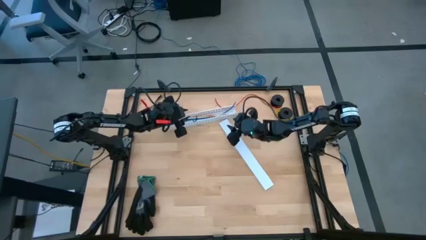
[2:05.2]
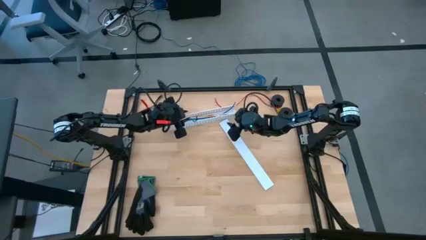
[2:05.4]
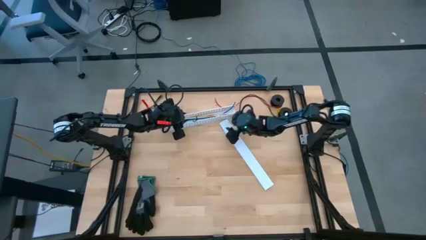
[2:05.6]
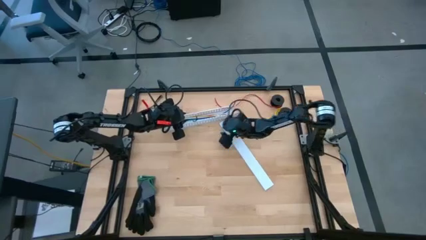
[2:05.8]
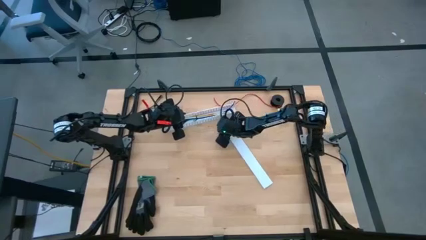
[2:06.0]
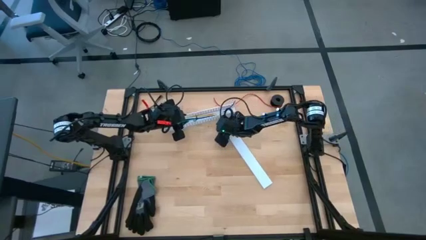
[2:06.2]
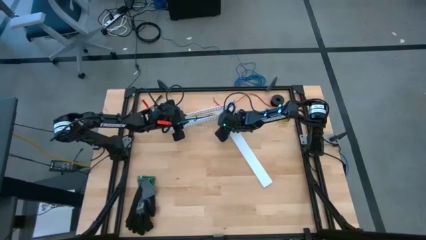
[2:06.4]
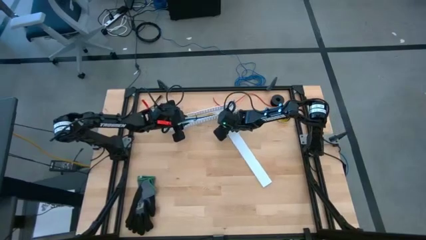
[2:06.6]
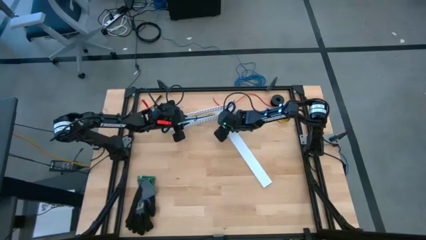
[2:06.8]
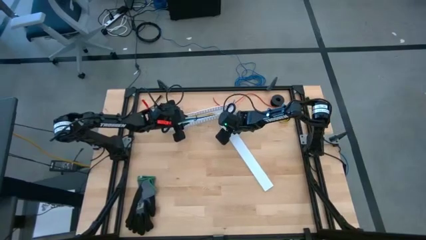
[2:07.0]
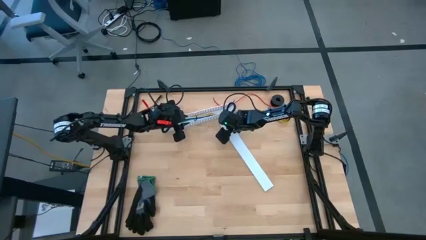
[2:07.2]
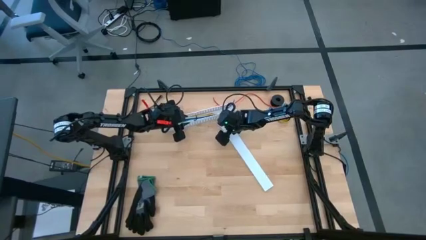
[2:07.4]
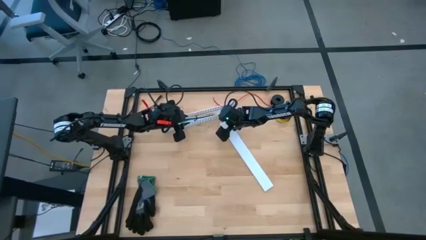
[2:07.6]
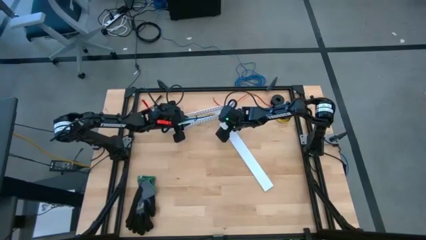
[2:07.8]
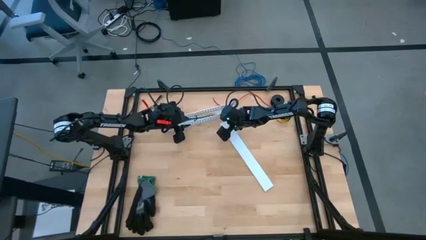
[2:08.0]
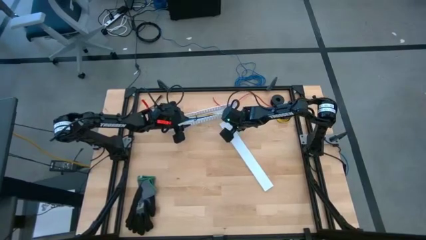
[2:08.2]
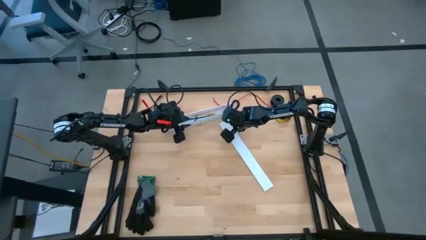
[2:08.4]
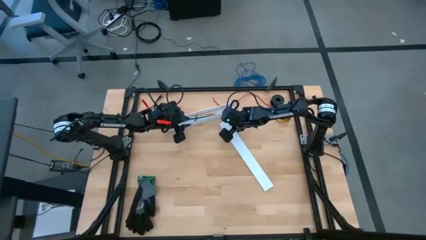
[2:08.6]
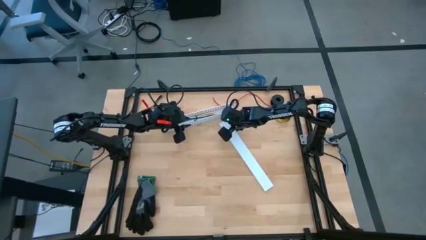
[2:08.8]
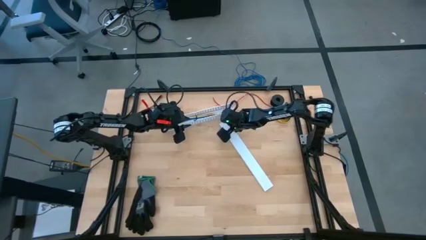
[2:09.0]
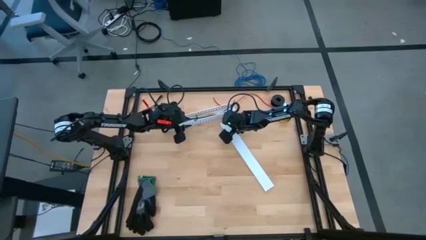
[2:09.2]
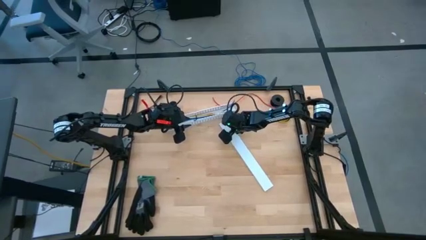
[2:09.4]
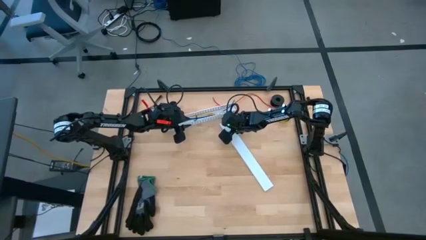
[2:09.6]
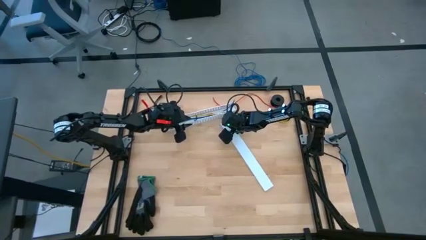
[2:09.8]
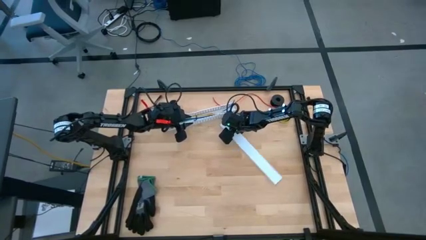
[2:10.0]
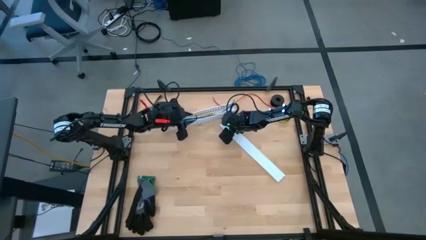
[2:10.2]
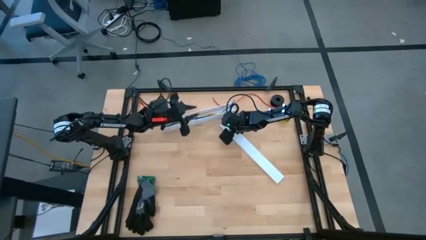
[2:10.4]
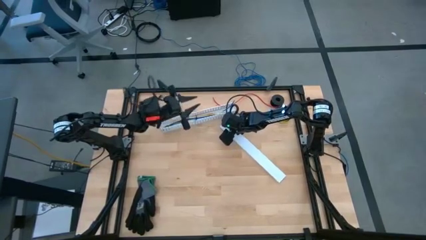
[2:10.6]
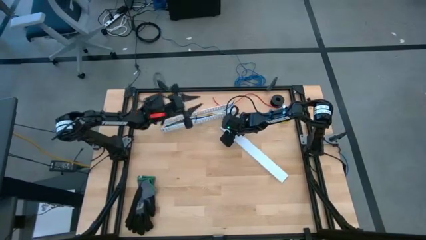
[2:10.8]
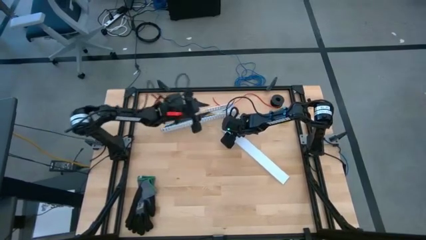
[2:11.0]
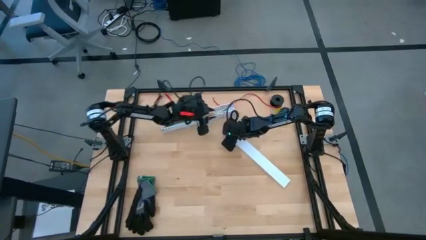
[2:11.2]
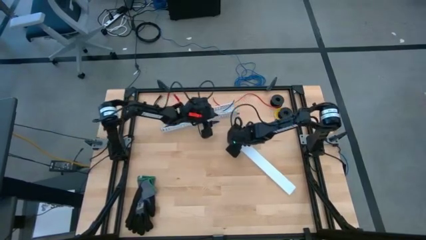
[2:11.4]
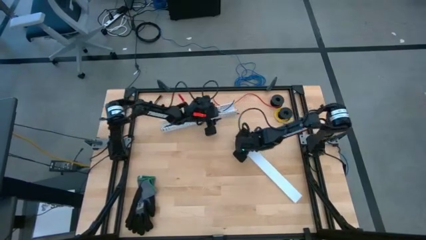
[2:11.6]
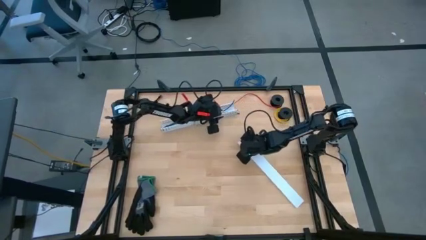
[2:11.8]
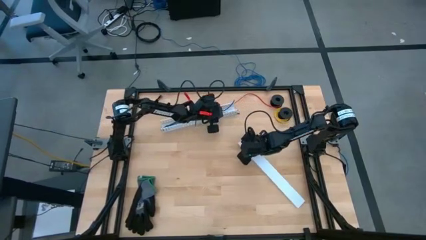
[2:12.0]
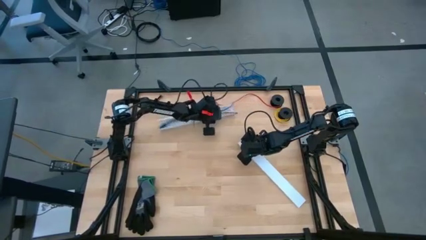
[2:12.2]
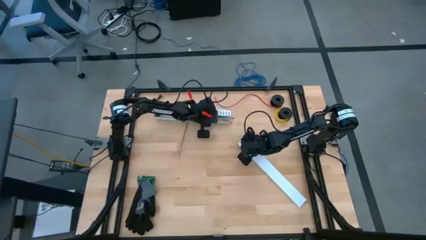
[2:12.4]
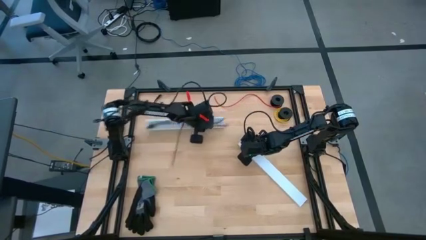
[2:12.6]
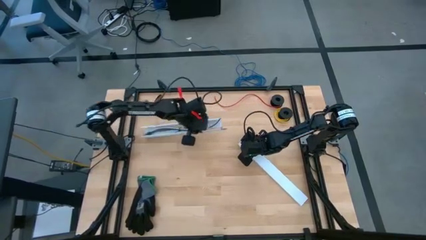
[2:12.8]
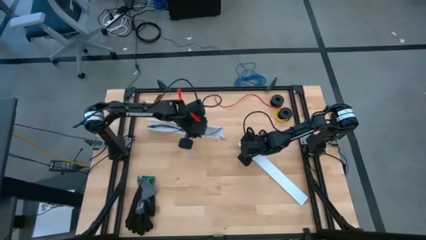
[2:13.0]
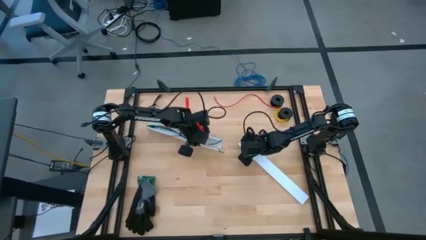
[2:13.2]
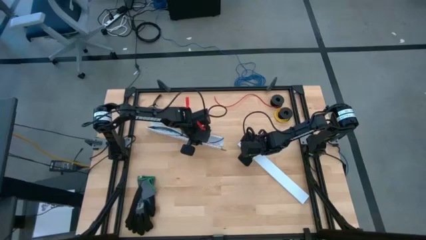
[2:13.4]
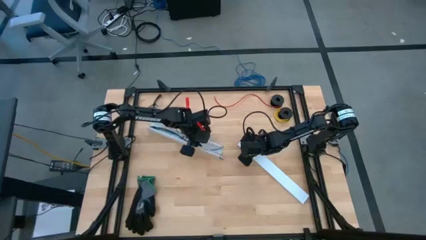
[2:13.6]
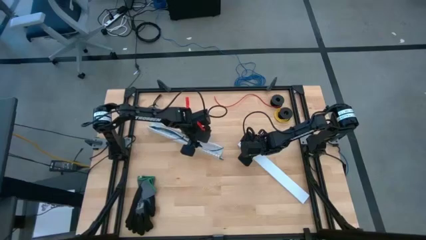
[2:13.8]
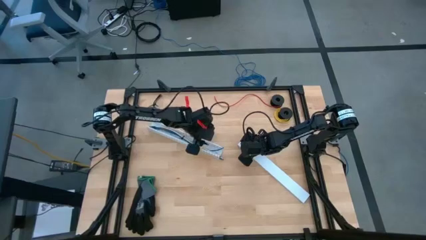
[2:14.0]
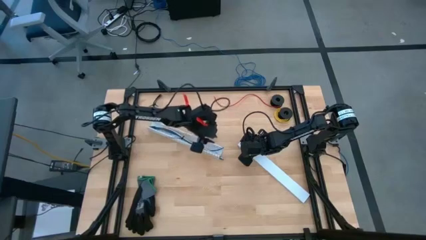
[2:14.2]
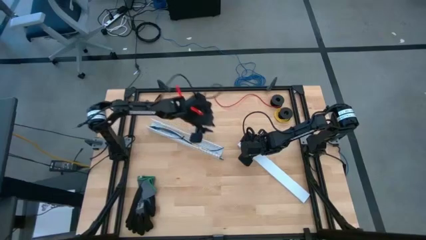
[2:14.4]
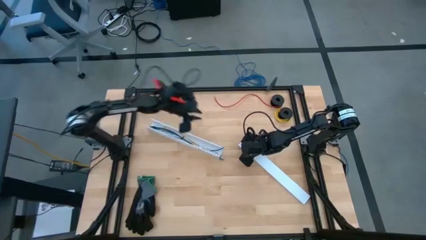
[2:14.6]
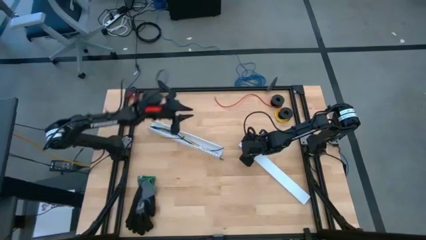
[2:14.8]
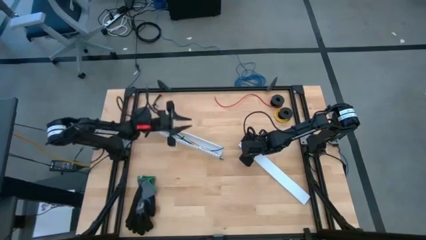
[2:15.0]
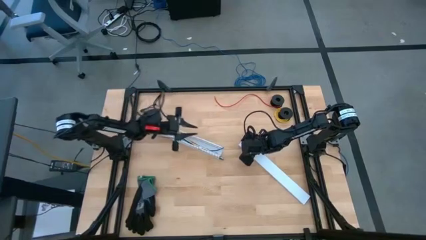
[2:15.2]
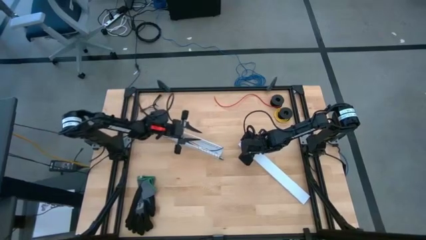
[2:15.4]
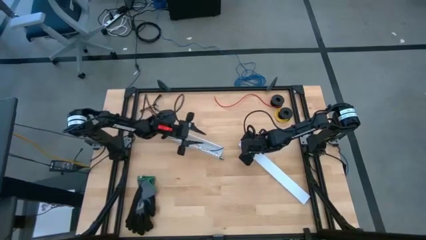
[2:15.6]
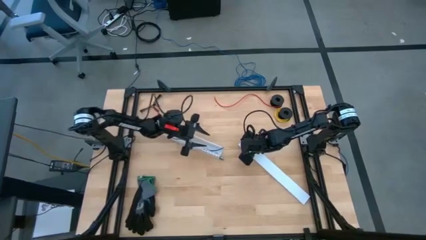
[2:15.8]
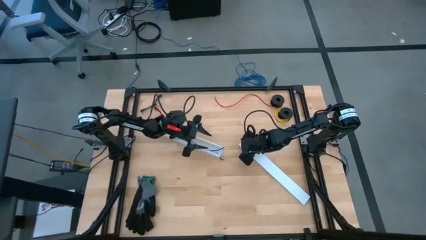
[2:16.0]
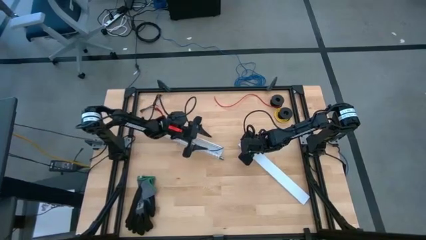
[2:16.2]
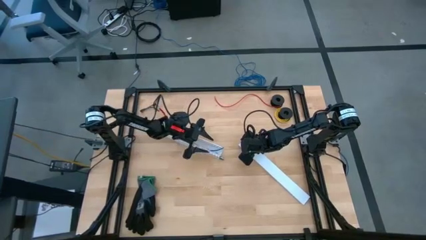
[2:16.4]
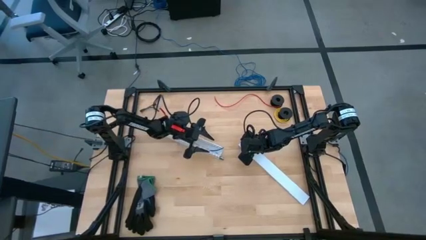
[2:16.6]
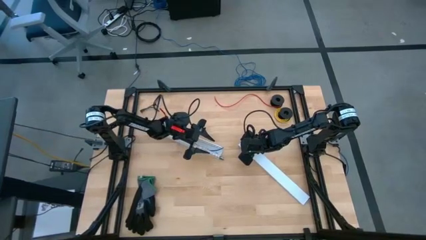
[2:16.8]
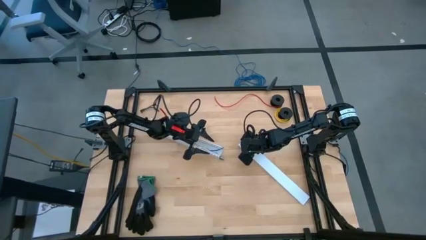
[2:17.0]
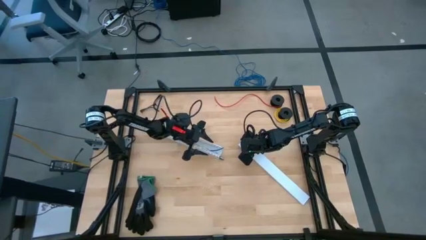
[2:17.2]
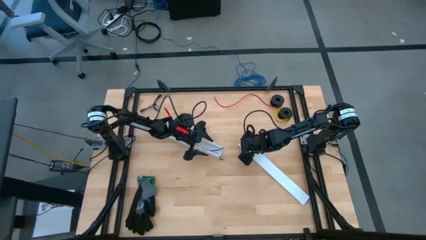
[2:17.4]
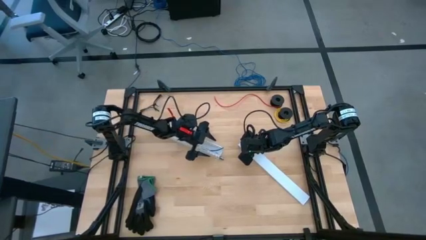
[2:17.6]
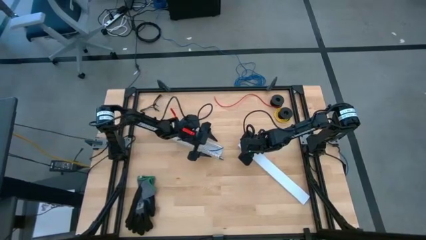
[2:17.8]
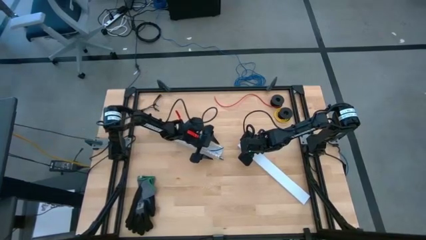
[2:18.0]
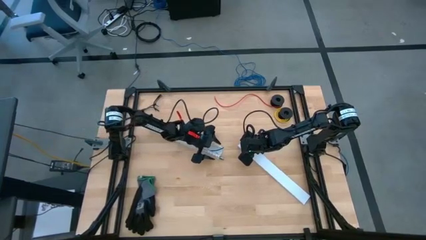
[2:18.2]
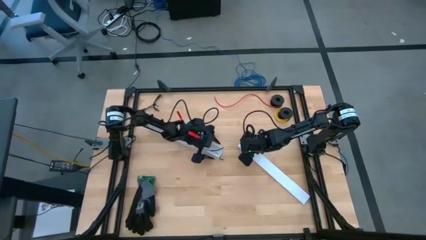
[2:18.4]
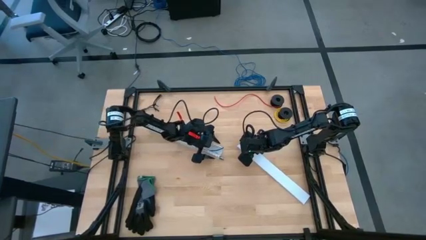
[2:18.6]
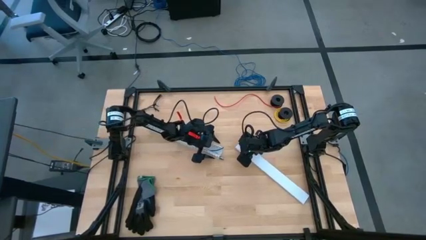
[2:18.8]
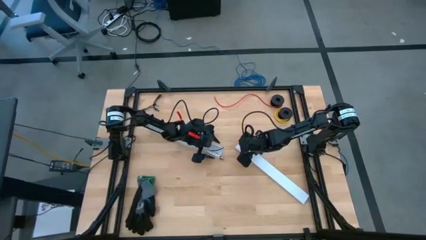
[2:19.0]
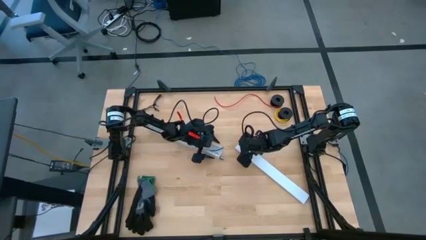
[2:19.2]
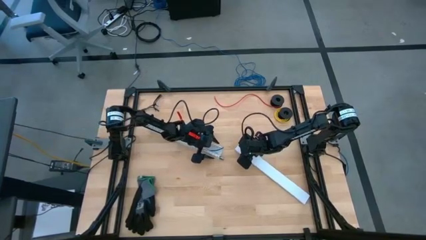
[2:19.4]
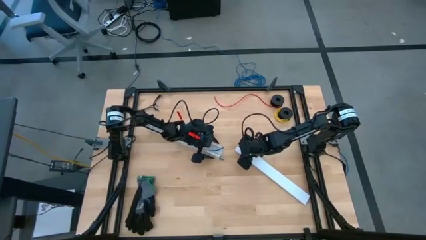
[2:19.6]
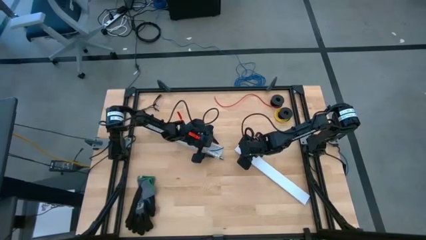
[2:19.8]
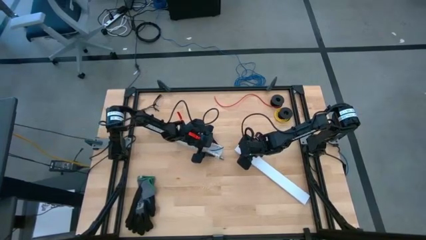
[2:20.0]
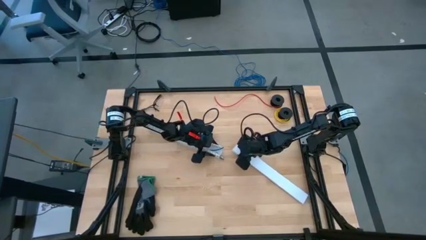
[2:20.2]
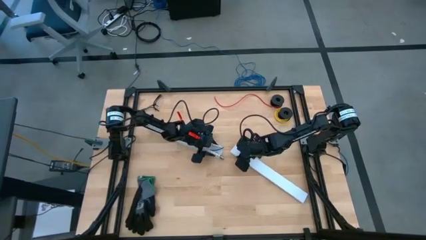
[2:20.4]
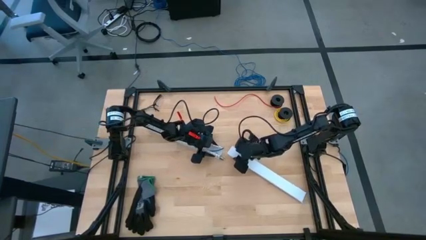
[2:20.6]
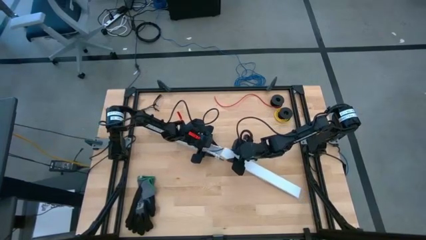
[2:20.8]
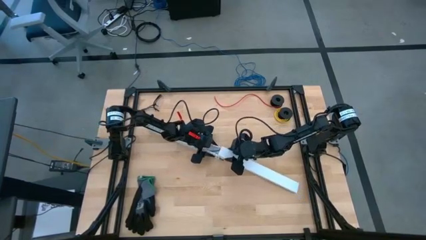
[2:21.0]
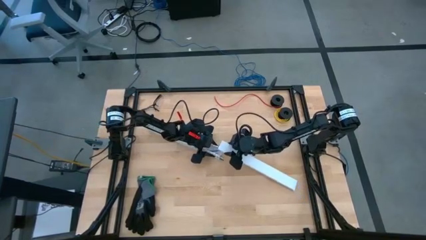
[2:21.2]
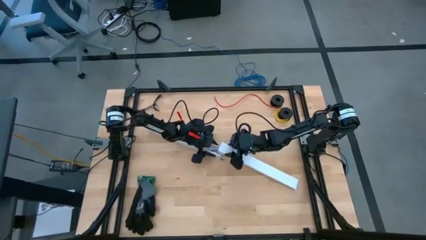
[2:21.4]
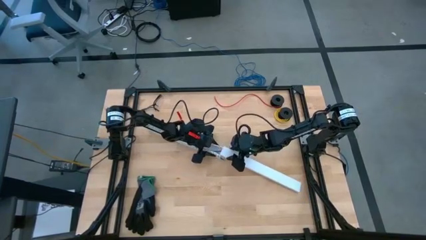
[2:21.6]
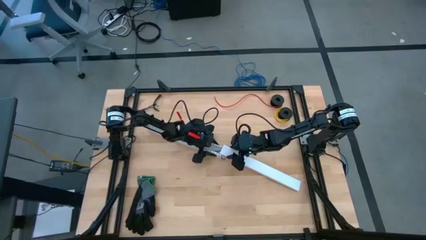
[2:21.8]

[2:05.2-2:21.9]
Task: Ziptie cables
Close the white cable duct
